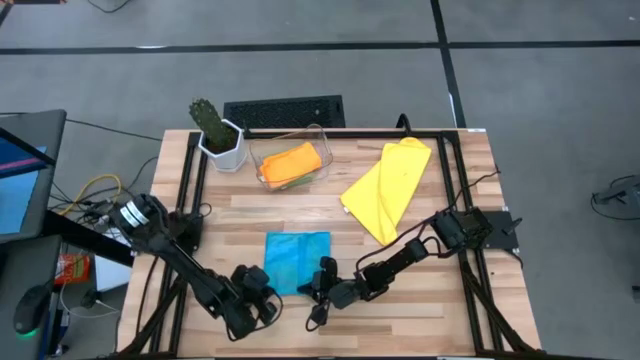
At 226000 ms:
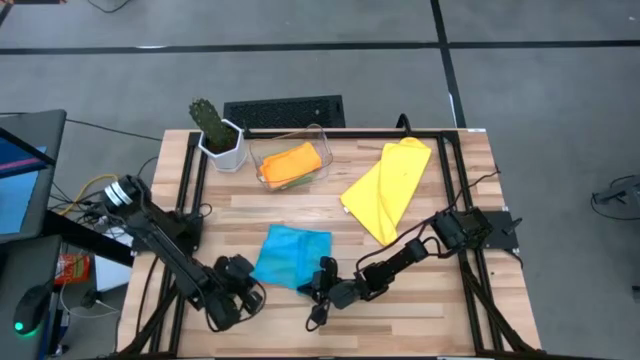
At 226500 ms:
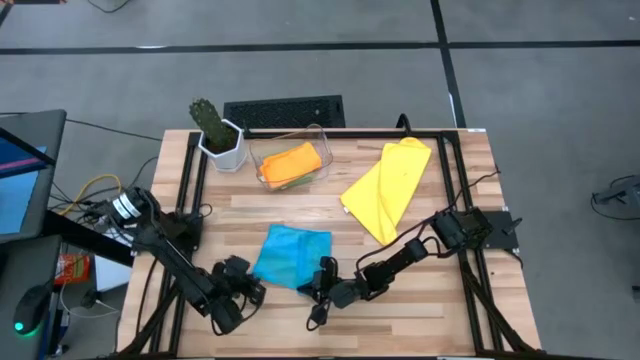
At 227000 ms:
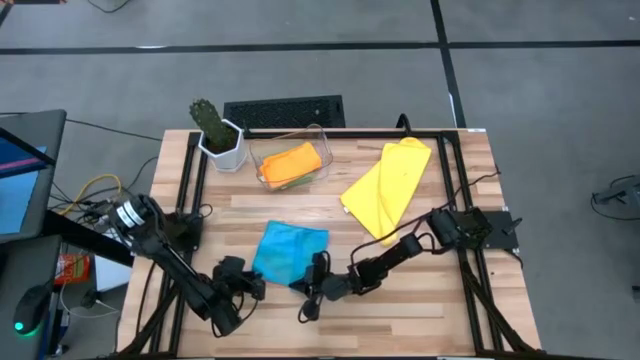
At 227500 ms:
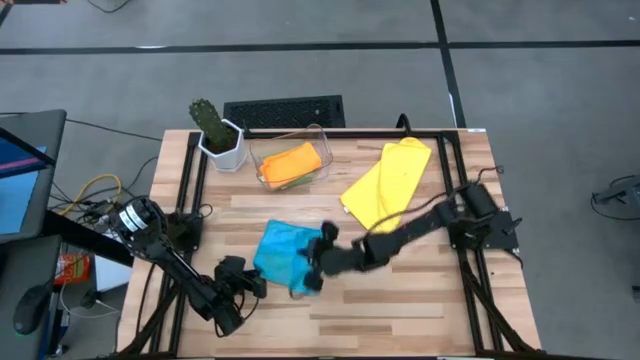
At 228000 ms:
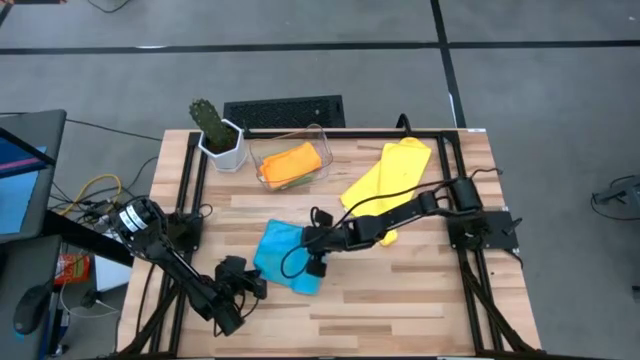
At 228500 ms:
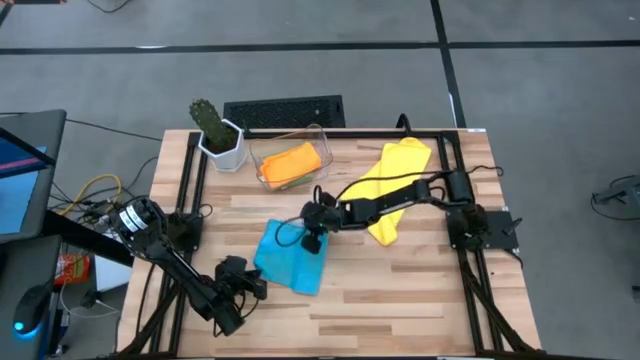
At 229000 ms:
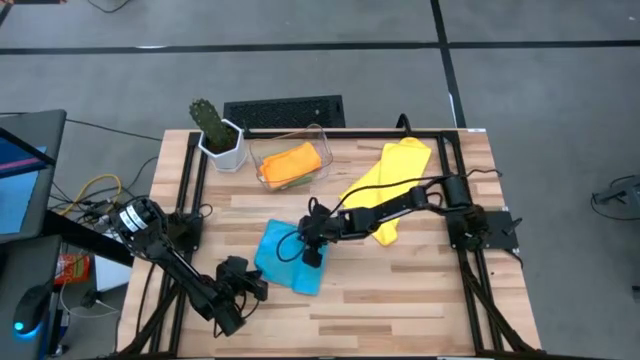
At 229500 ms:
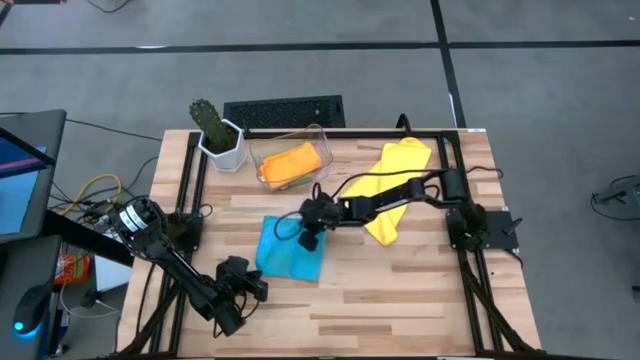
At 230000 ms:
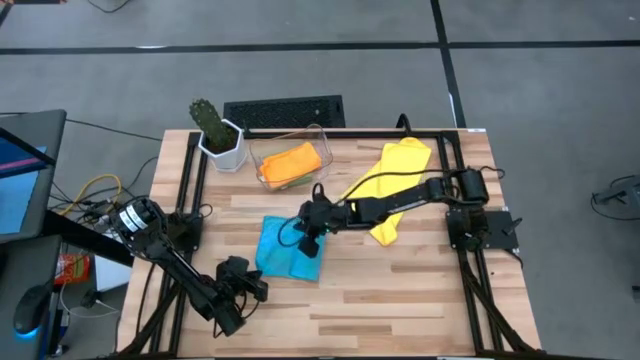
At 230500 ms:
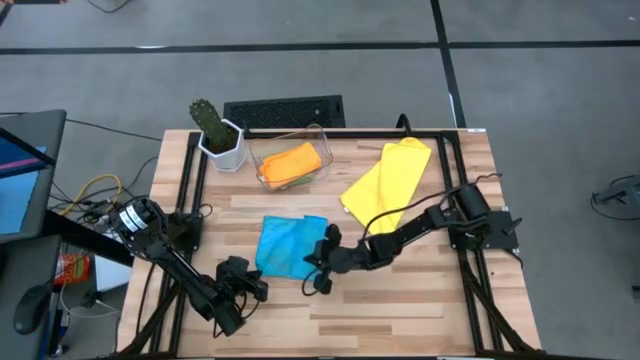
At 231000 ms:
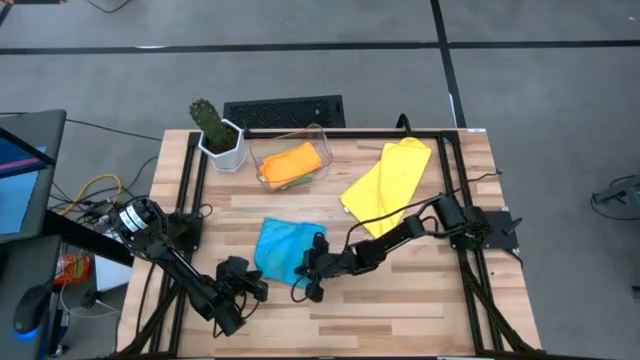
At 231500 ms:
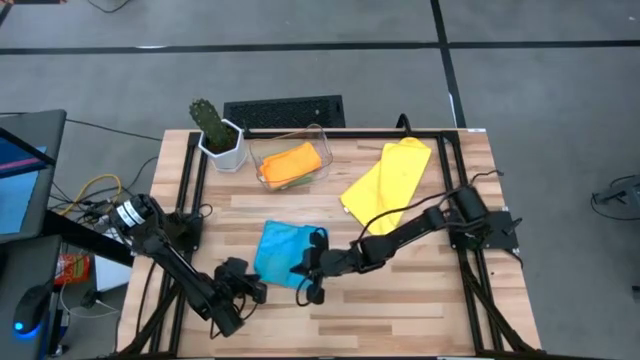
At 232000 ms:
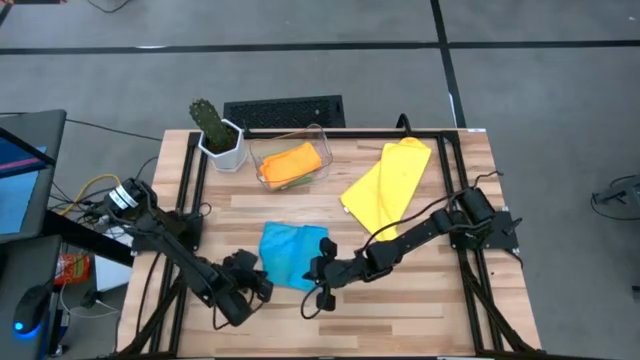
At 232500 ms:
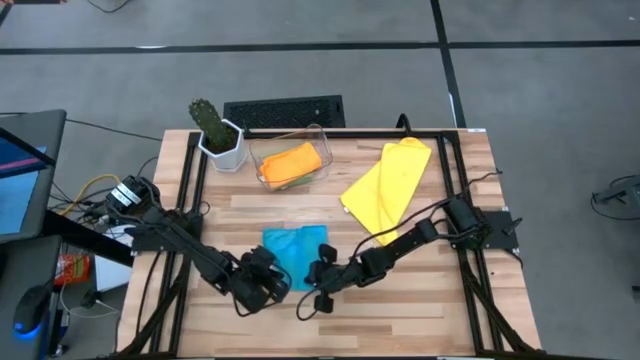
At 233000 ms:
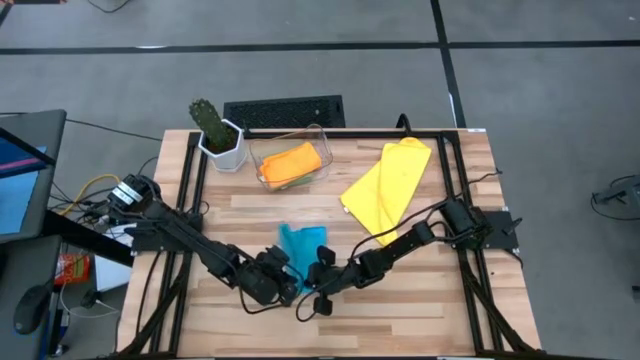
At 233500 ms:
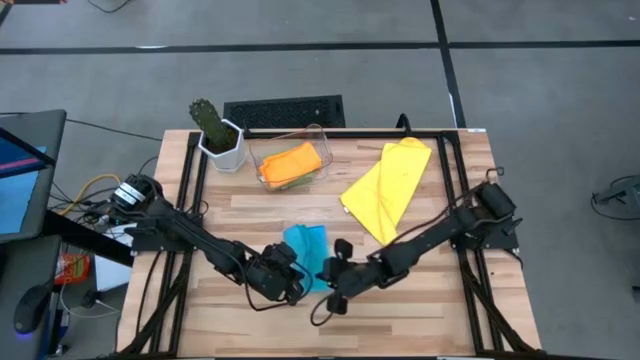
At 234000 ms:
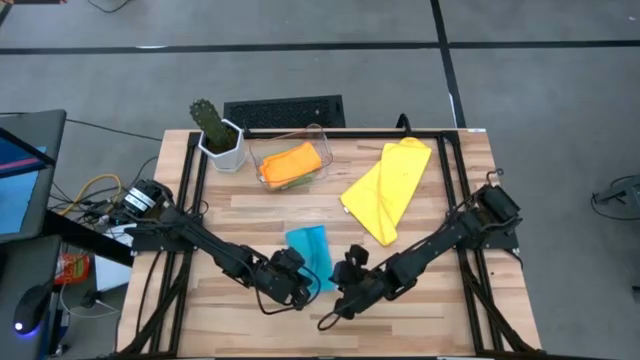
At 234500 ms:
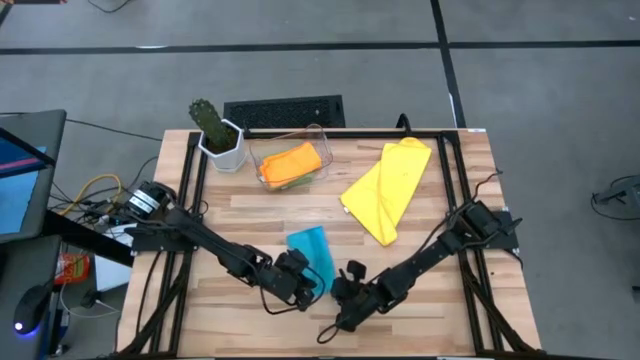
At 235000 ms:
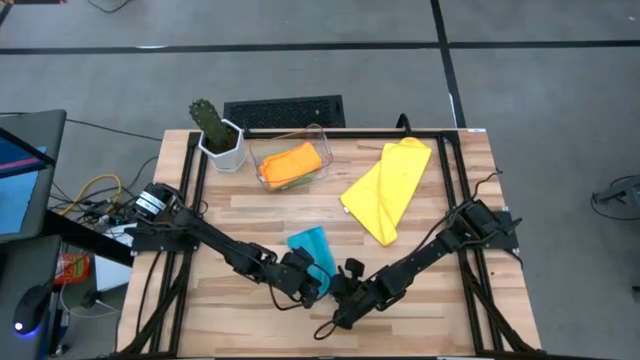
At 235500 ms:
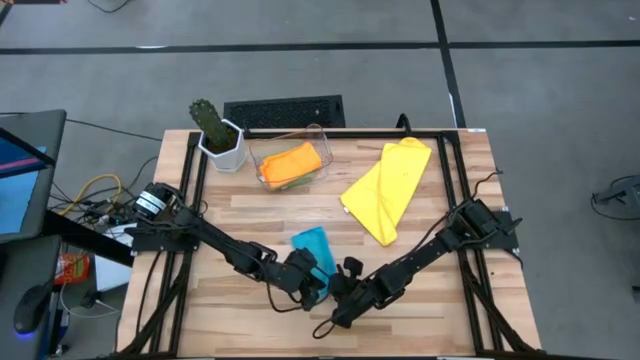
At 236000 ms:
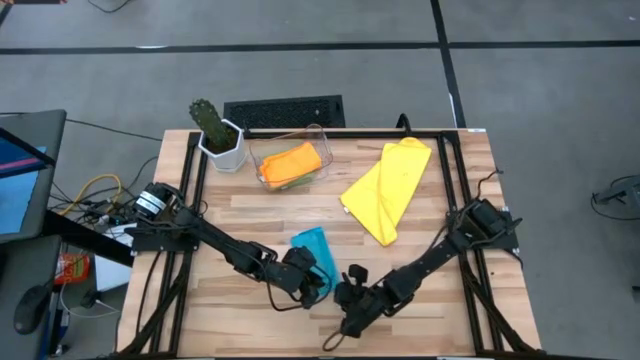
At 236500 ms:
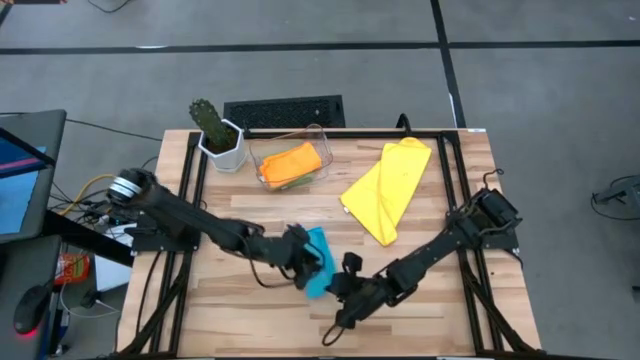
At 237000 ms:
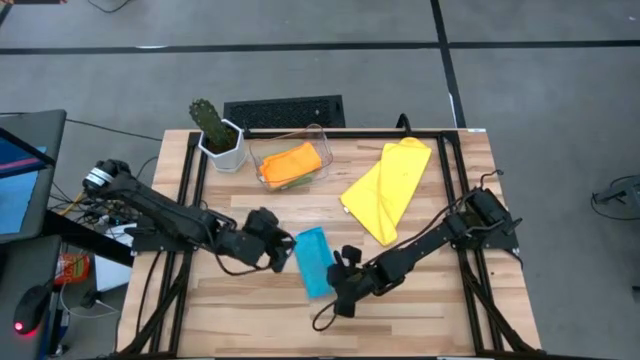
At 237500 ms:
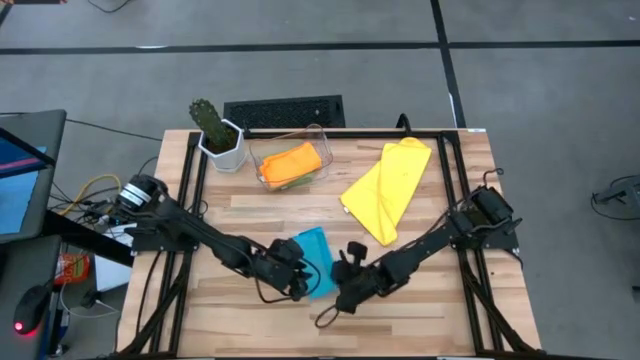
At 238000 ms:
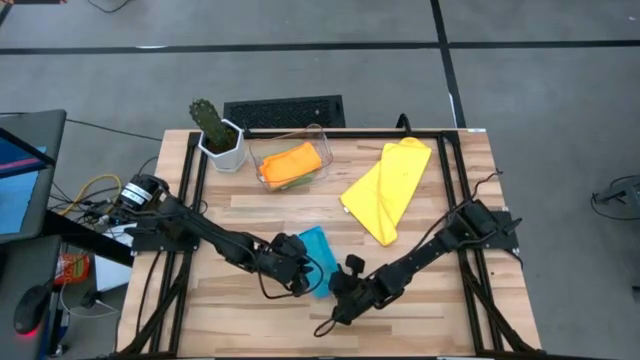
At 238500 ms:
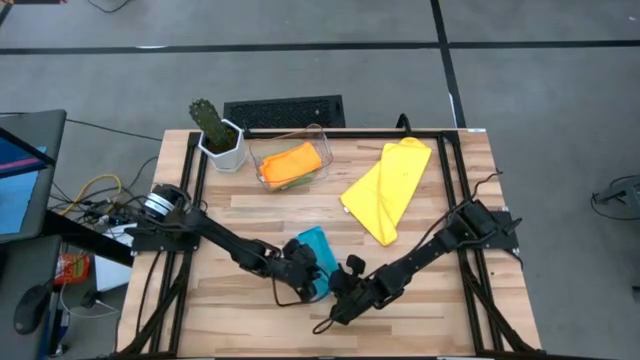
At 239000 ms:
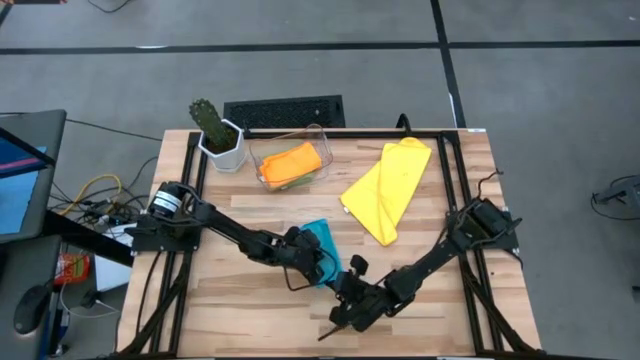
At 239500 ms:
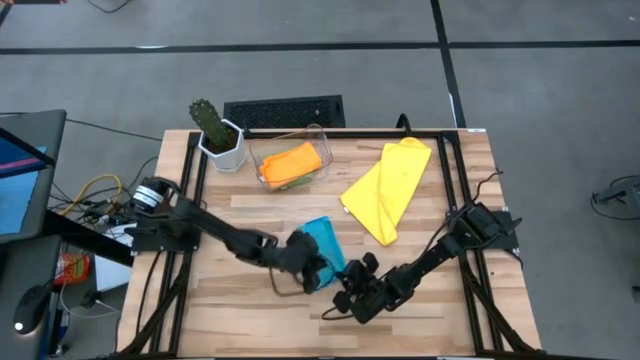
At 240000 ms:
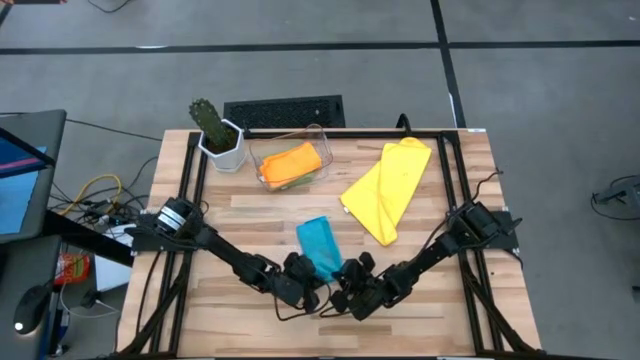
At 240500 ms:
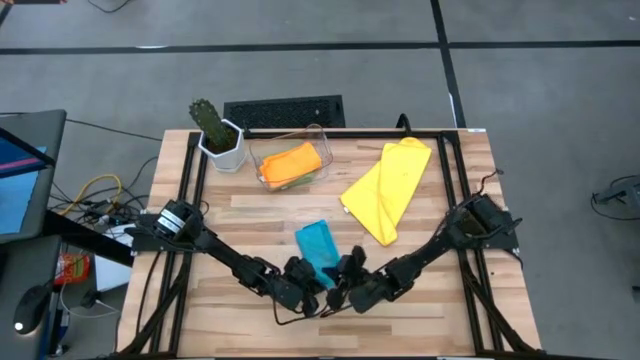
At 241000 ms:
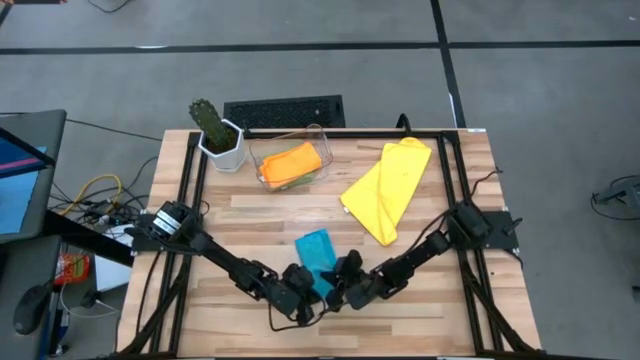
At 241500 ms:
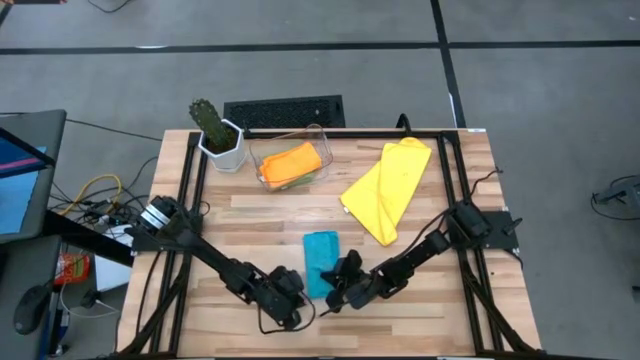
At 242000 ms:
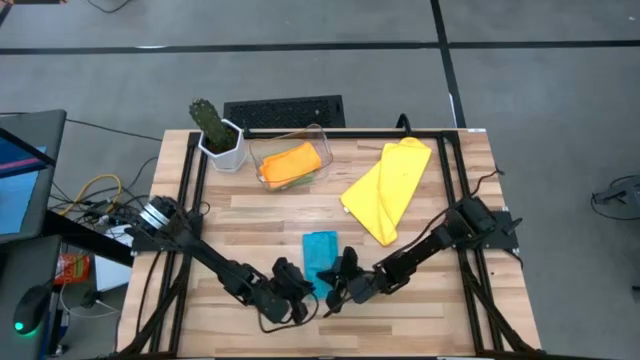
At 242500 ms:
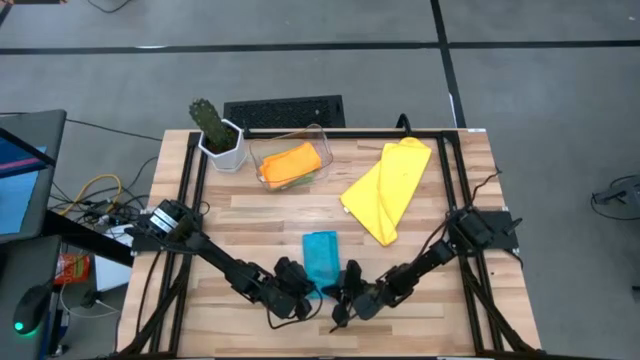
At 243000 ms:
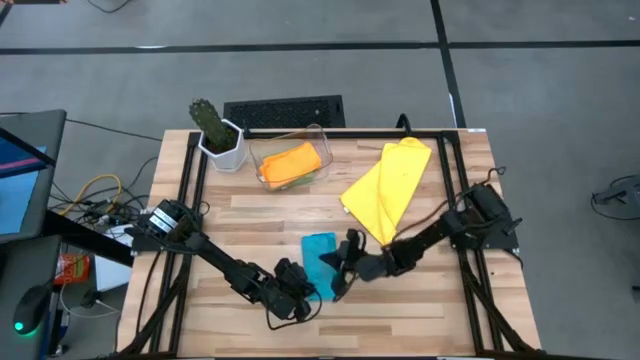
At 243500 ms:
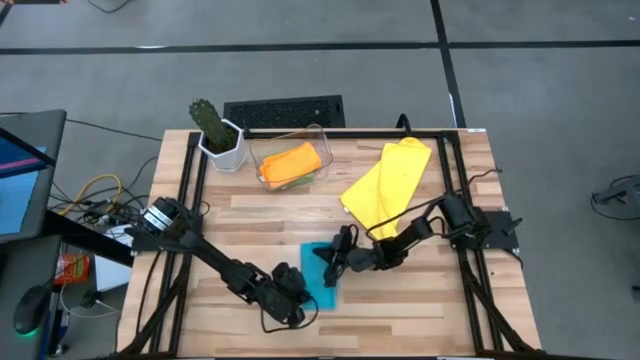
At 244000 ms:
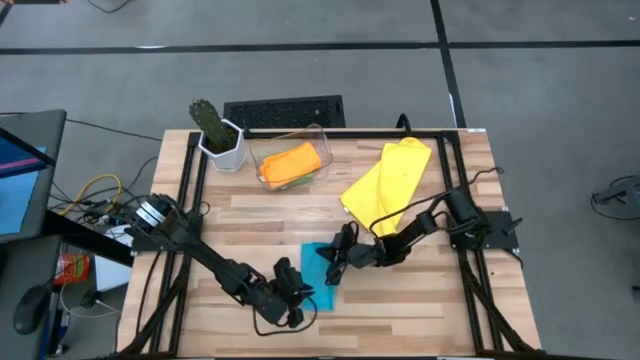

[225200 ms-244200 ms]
Task: Fold microfiber towels
Fold the blue microfiber cloth

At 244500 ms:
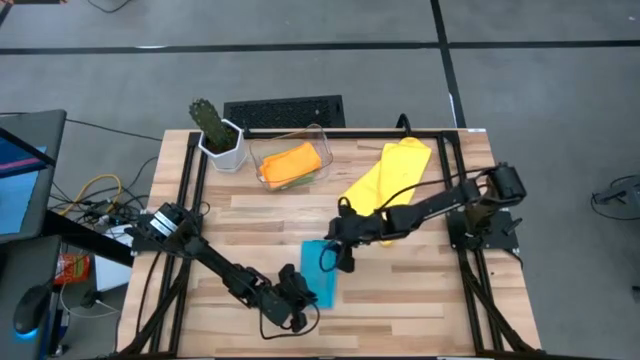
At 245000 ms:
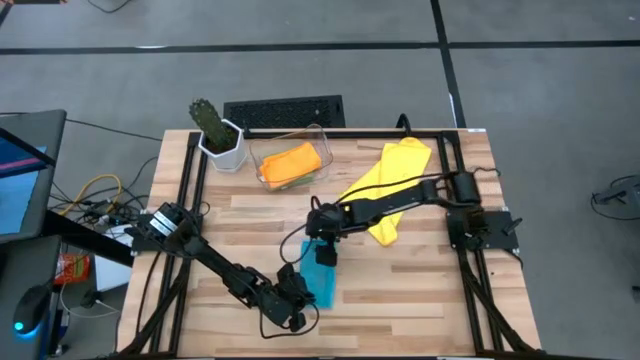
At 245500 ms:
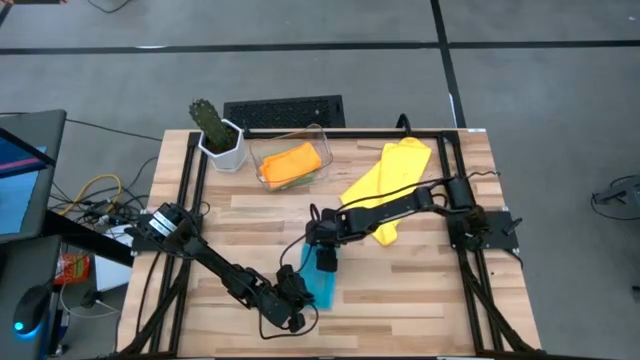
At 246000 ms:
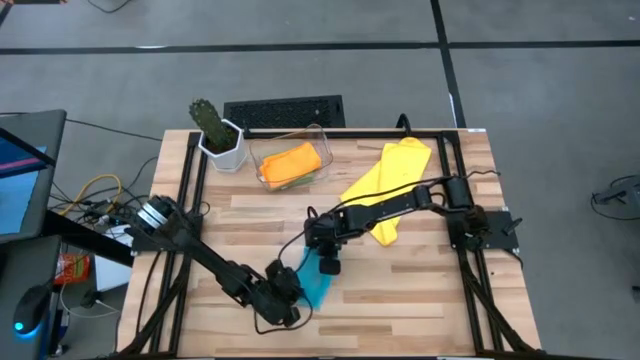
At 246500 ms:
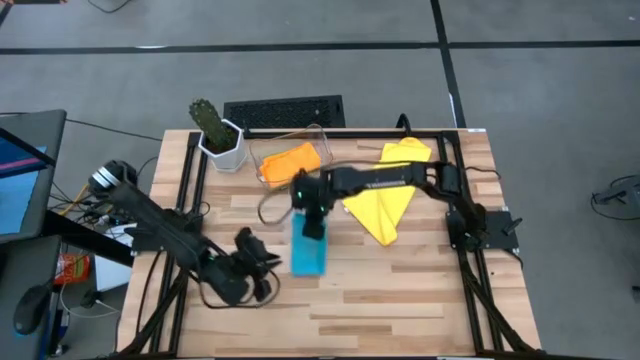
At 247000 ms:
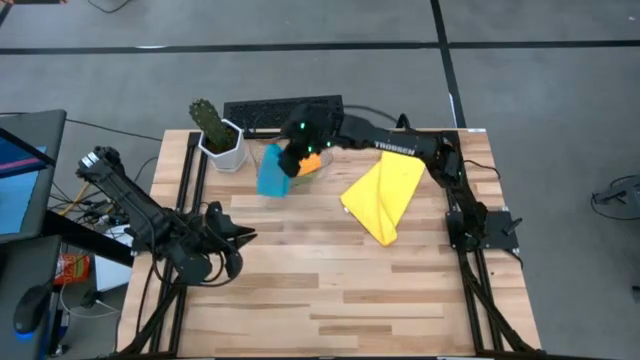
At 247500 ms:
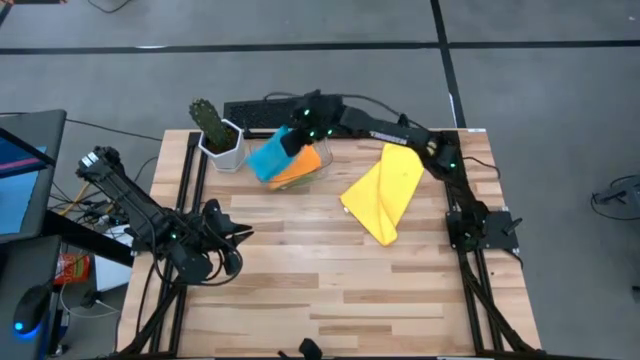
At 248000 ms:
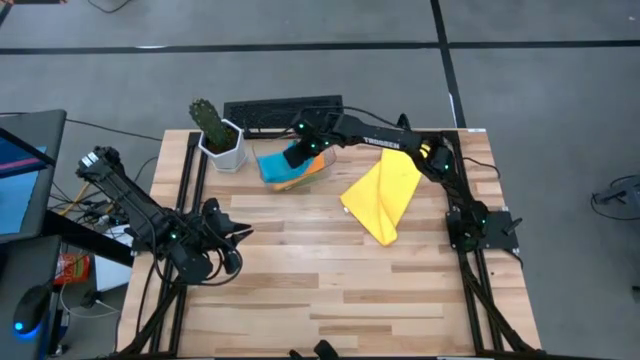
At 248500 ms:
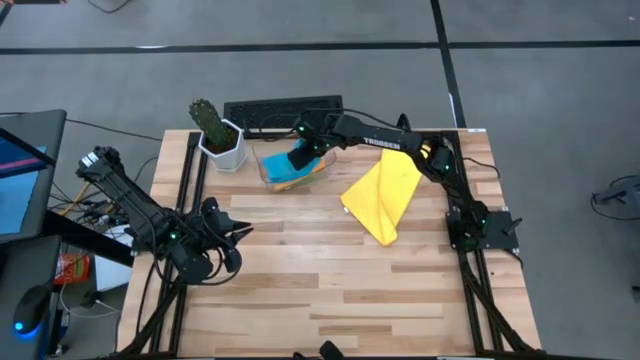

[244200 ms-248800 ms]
Put the blue microfiber cloth into the transparent bin
